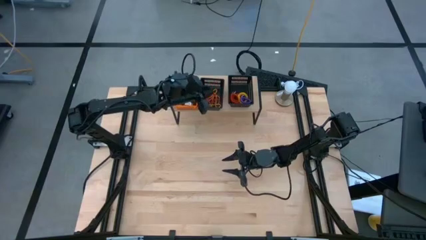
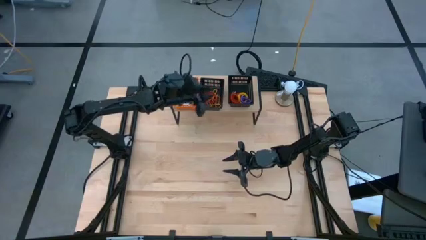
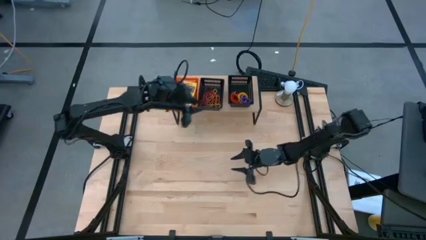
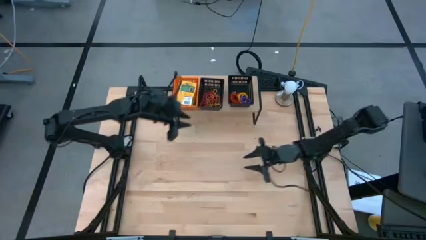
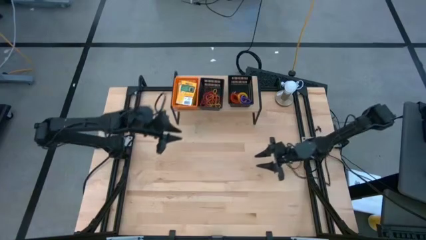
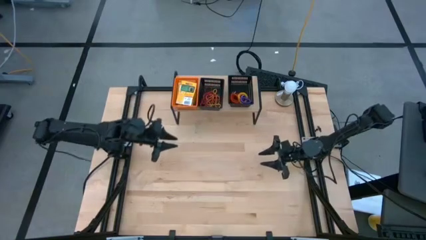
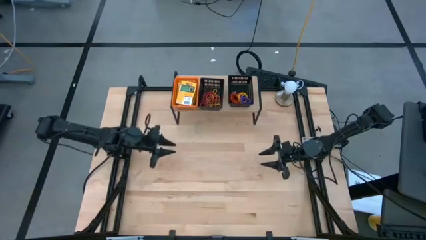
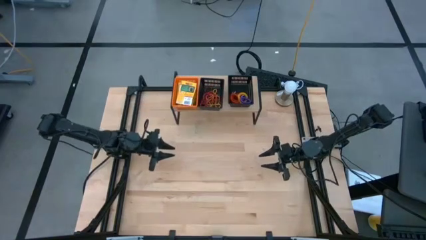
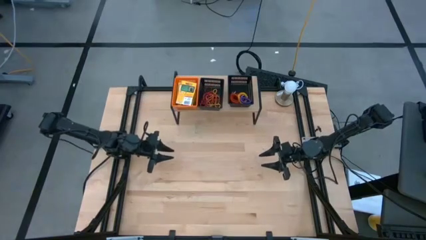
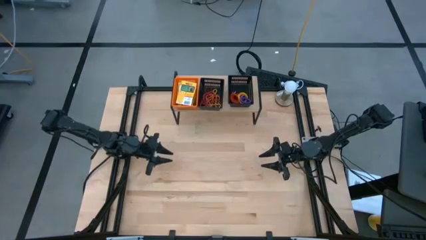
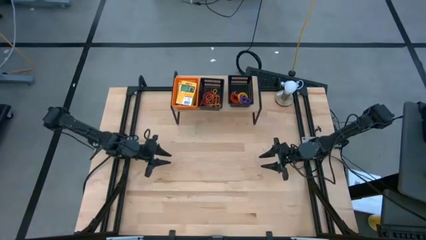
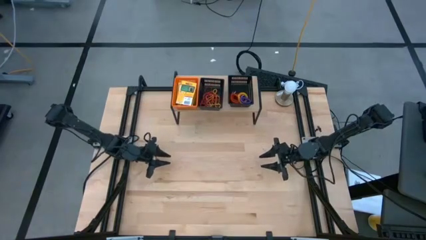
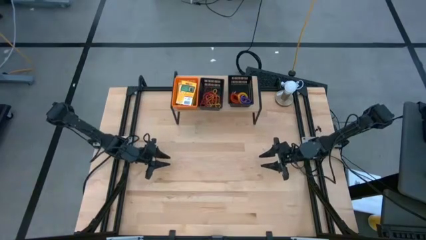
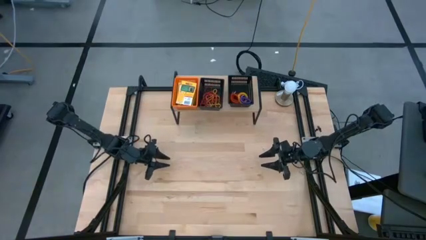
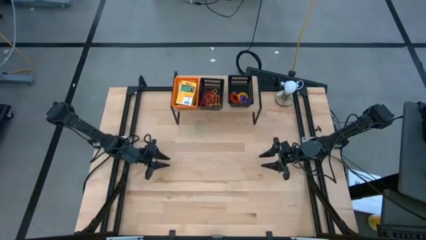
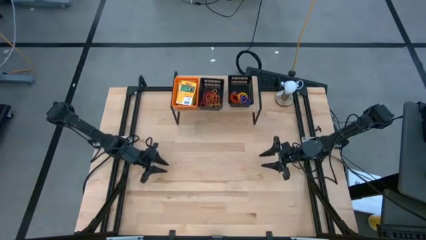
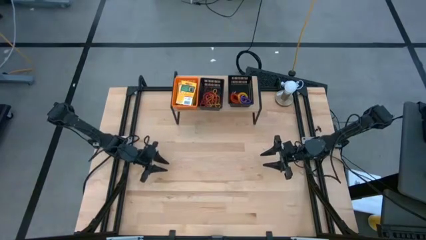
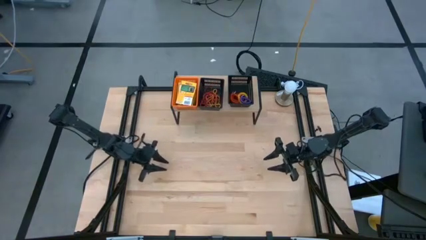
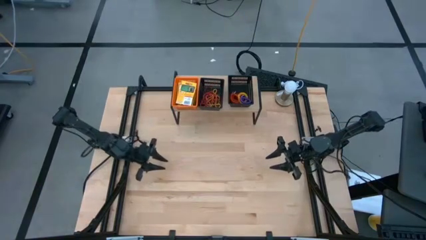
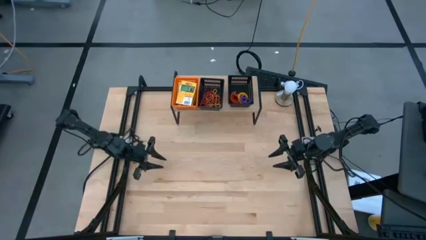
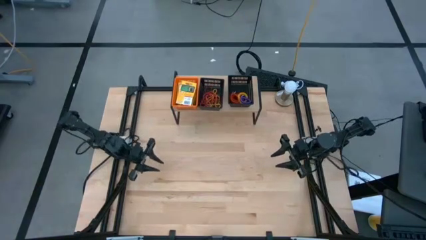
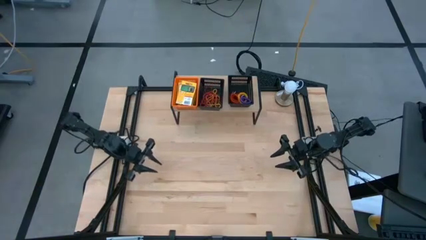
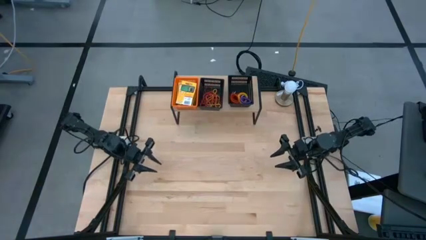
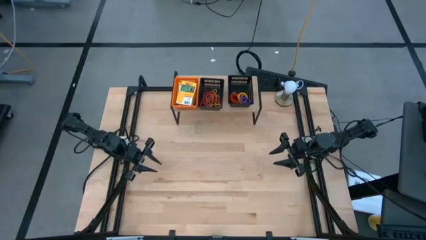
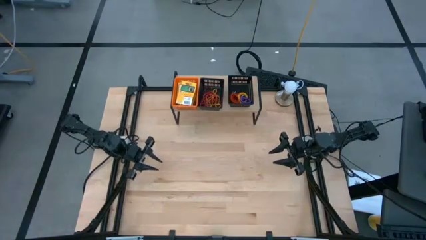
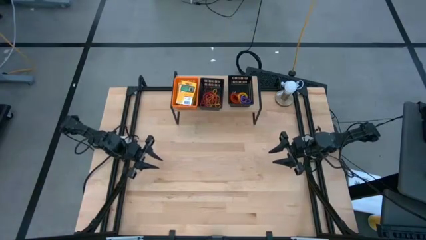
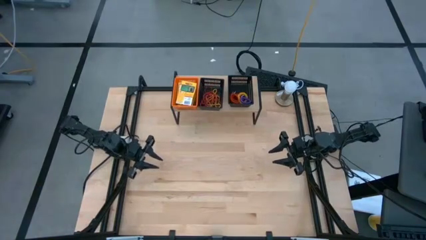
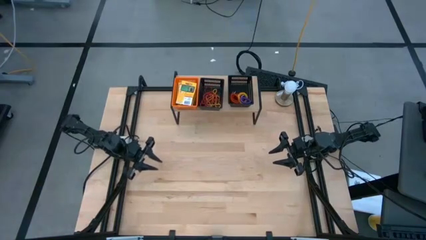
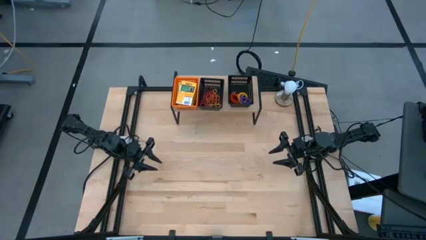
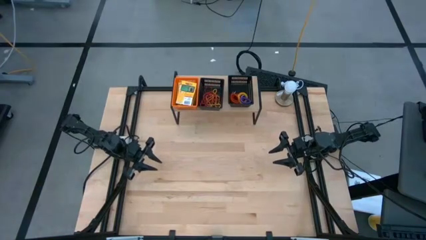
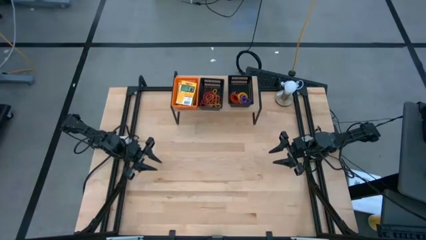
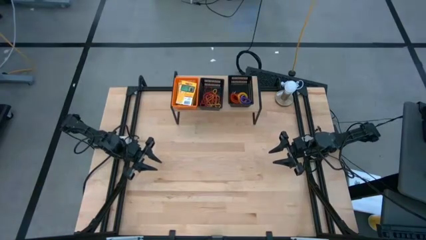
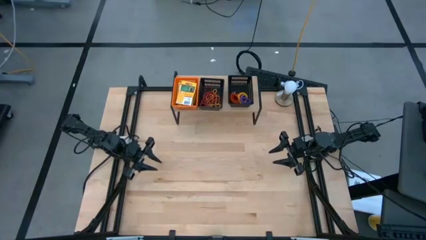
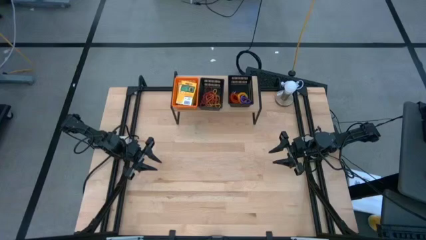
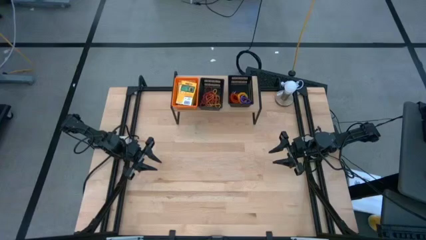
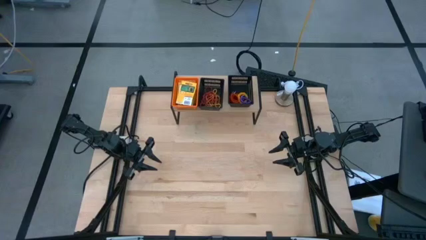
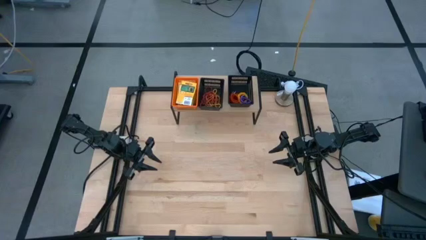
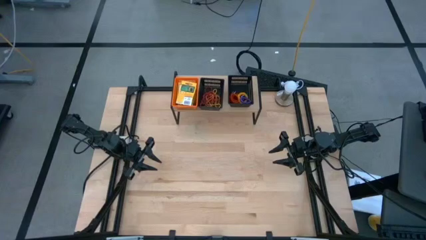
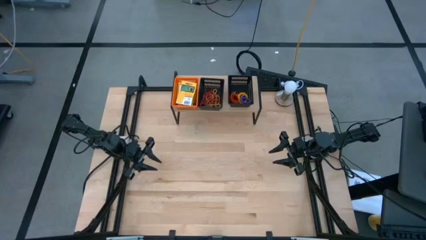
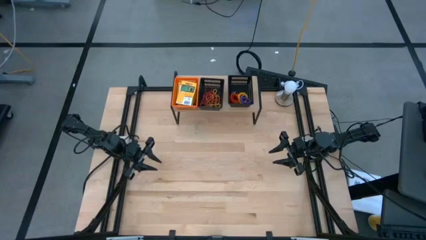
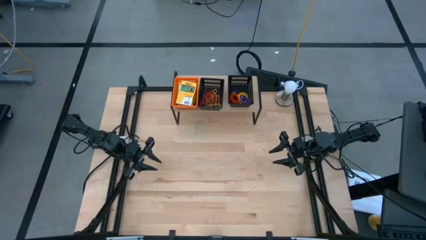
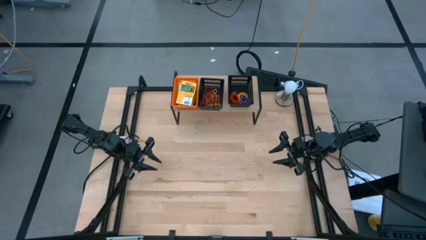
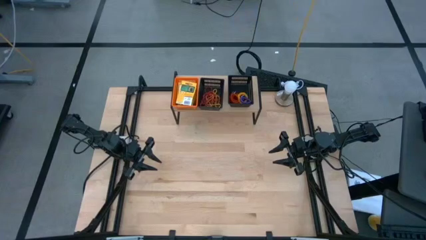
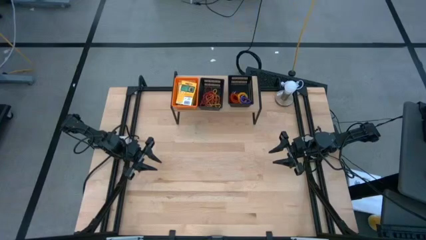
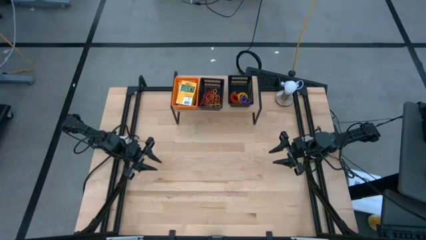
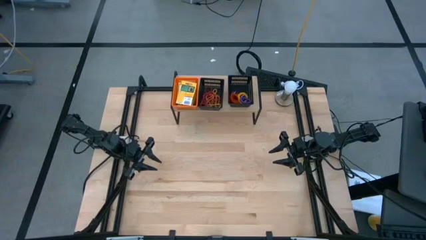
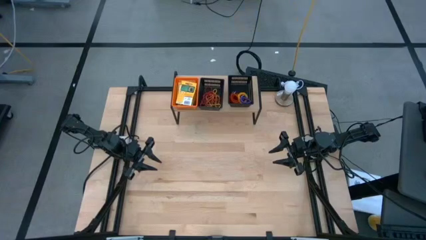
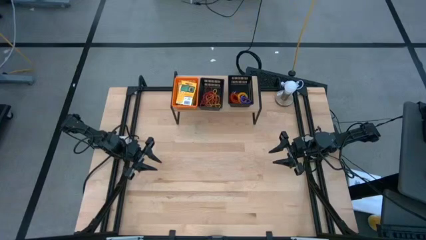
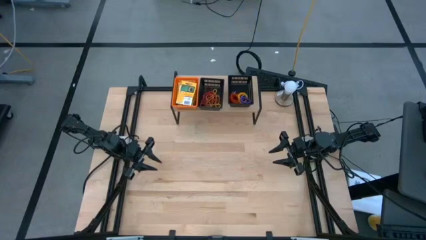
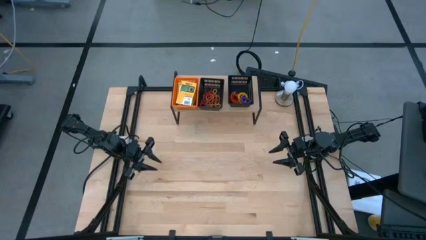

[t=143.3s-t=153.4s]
Task: Pick & Place Office Desk Supplies
Return to Home Position
